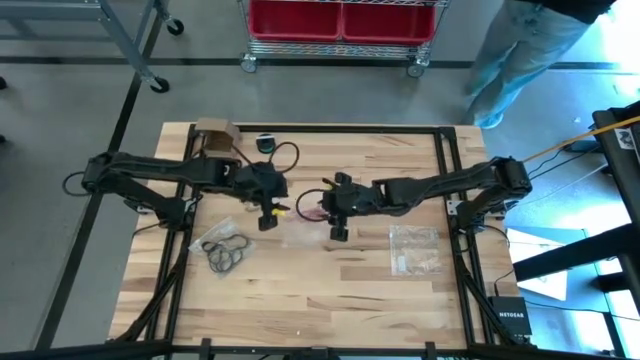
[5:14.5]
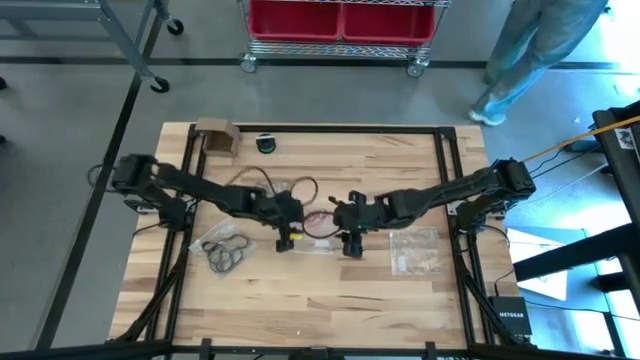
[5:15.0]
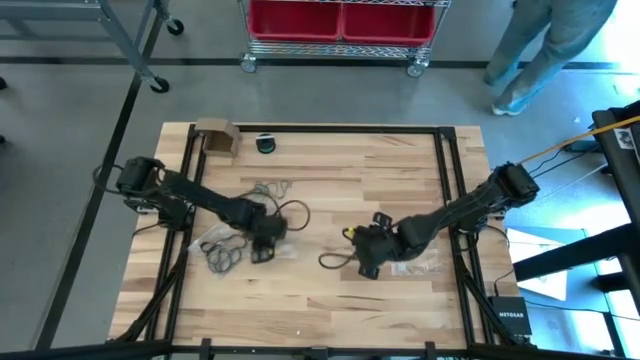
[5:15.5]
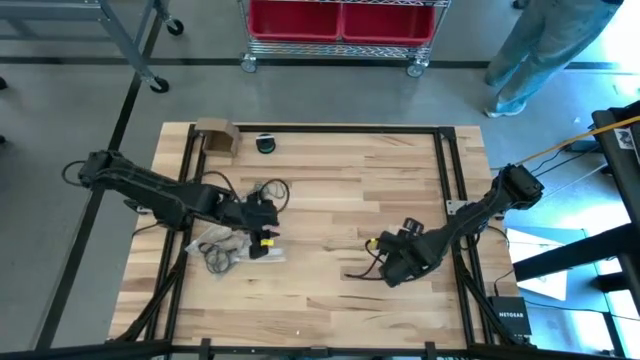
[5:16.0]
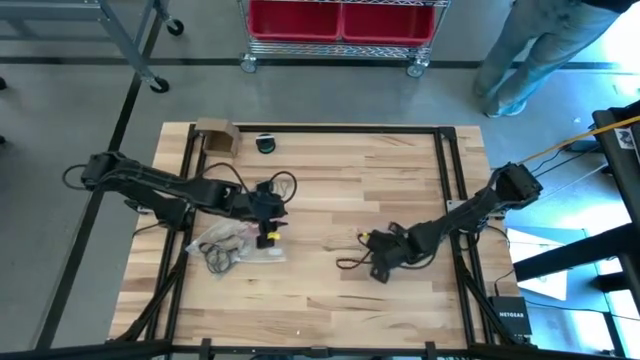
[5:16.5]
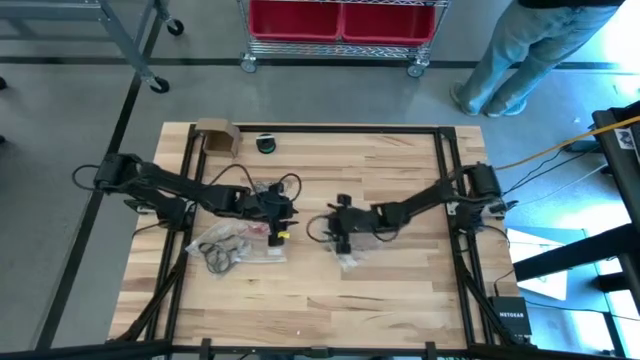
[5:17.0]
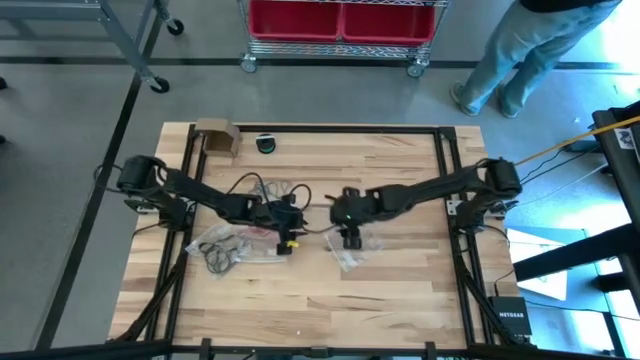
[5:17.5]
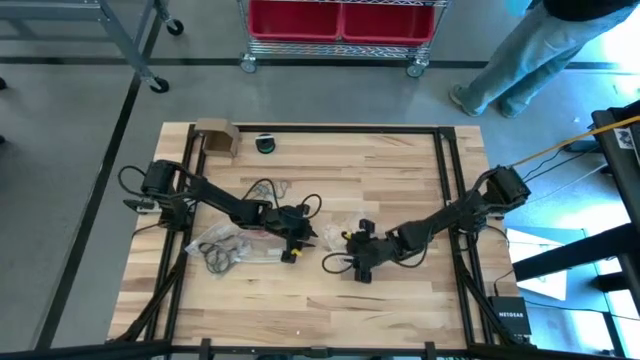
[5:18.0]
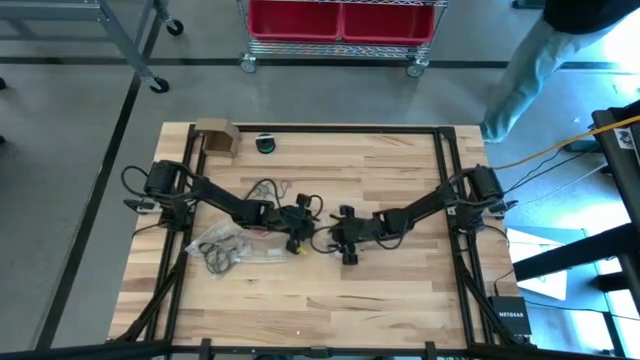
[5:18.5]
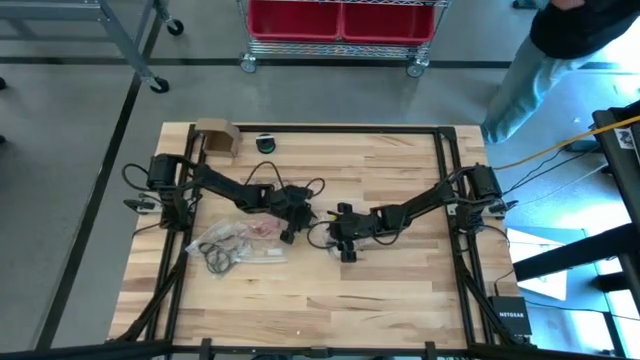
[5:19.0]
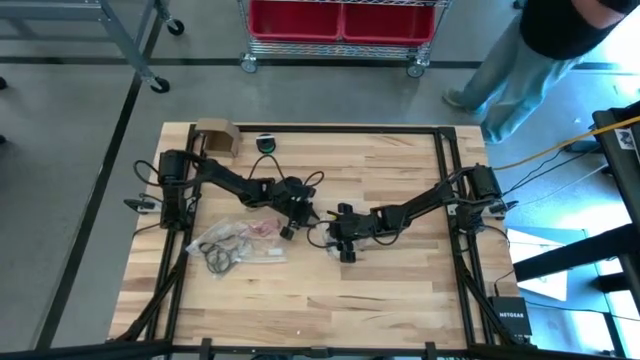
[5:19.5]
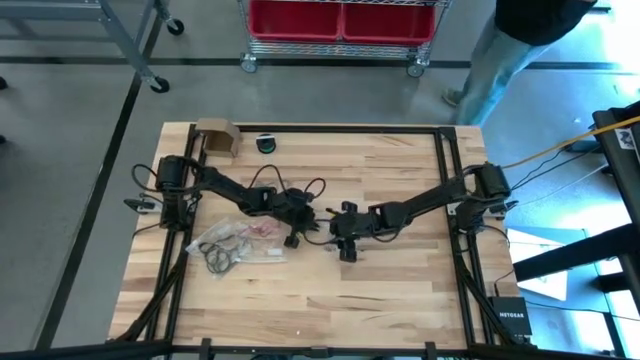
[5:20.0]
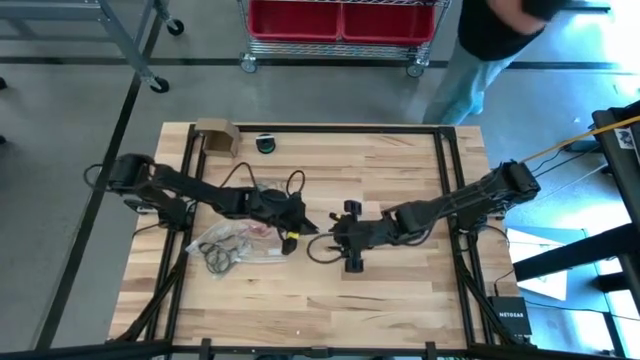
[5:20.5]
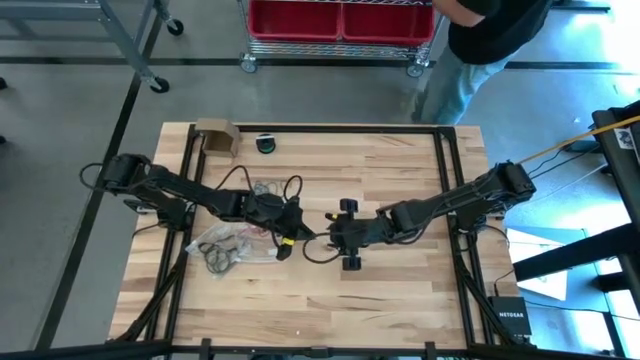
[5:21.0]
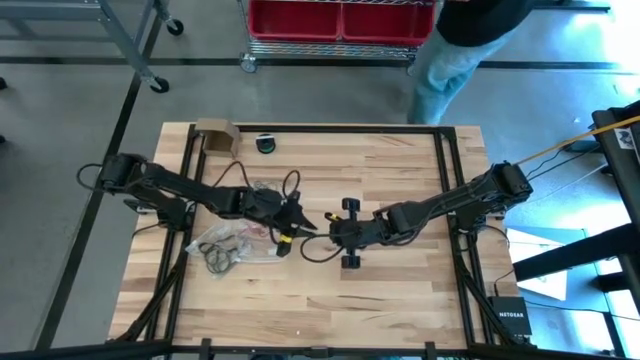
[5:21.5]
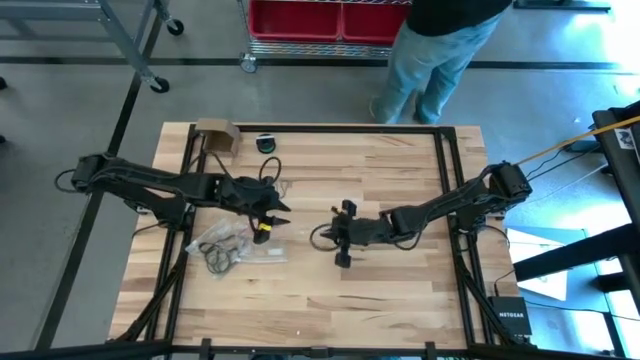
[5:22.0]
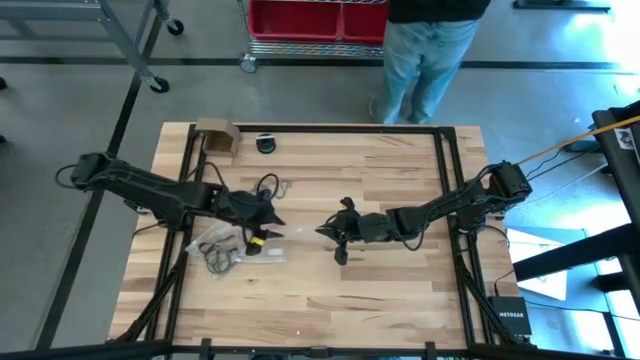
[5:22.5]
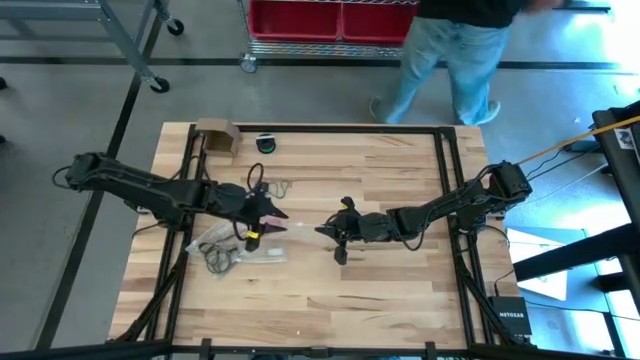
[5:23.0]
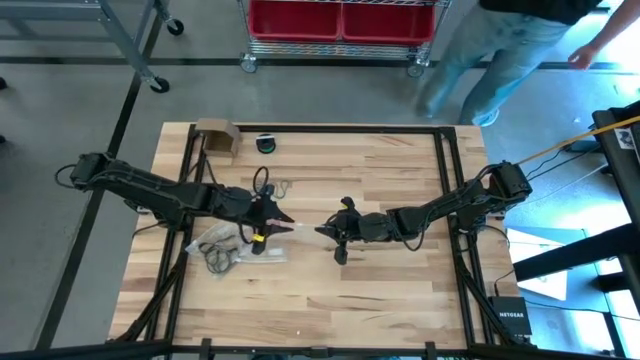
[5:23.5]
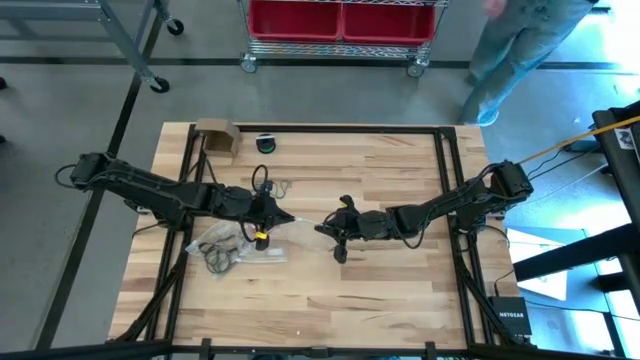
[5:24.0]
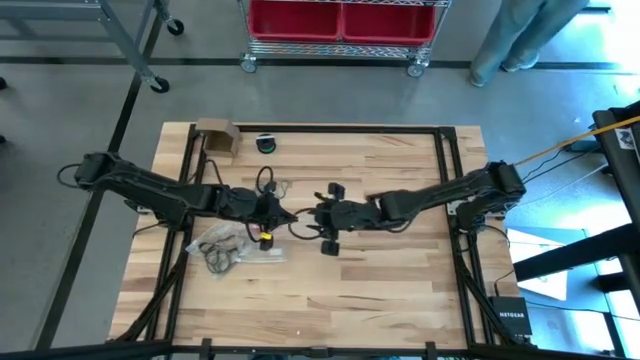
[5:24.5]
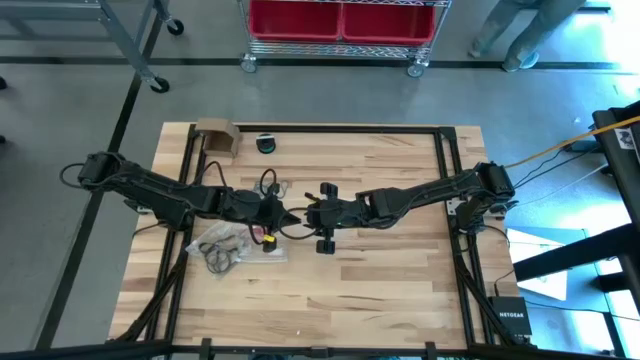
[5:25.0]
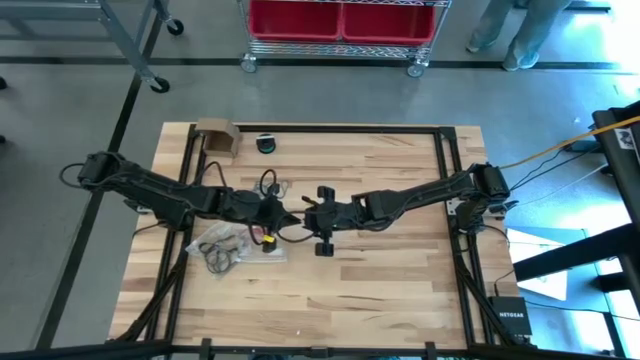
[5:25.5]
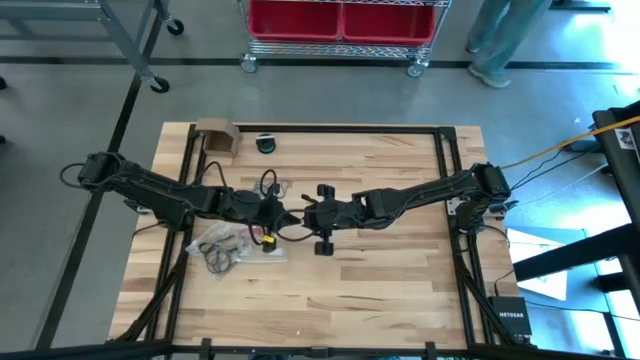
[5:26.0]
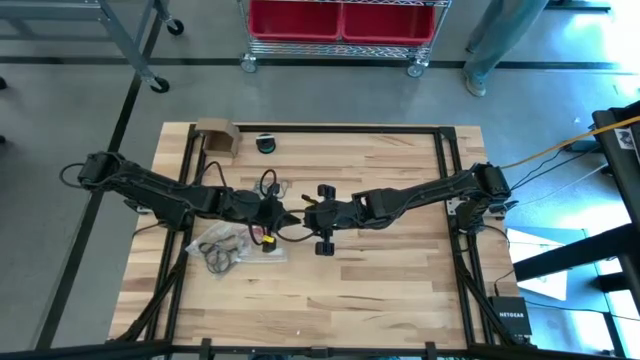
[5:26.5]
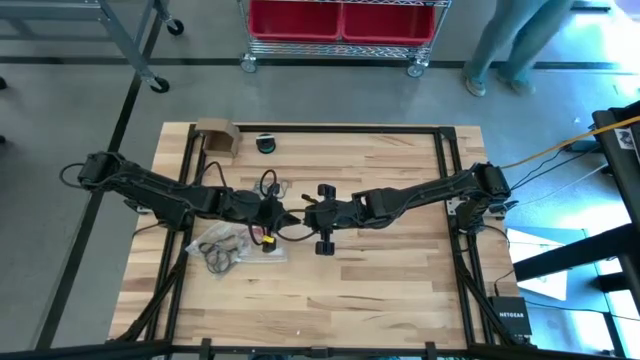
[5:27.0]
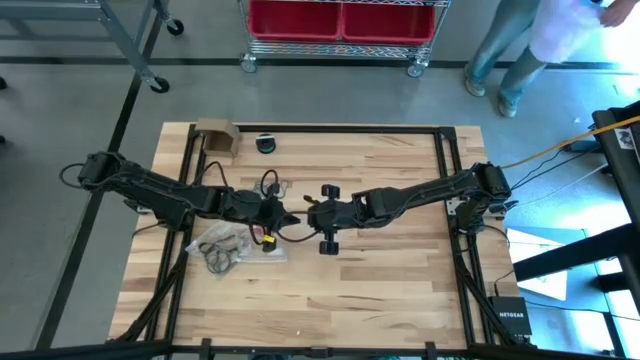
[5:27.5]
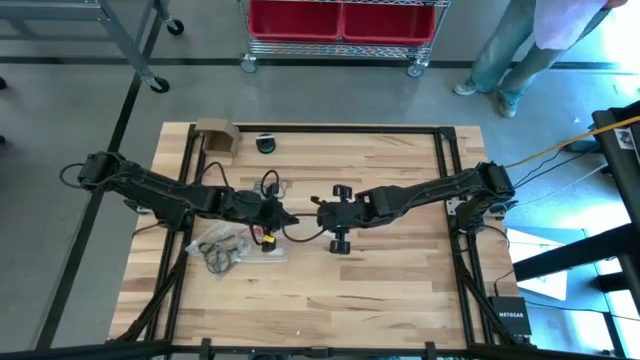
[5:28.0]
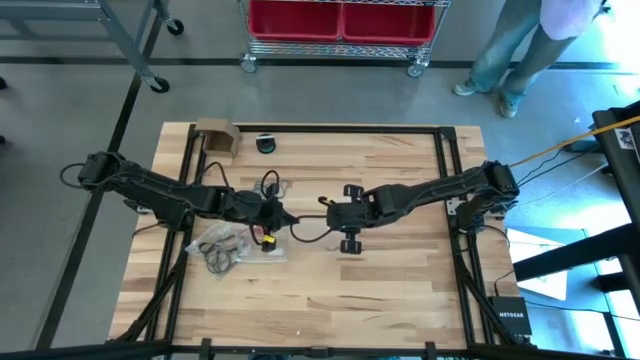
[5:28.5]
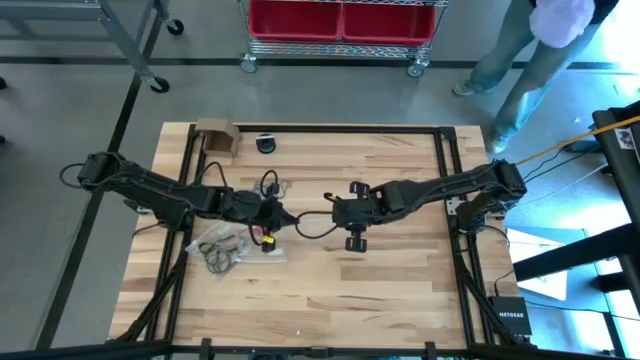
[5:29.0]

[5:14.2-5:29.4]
Task: Sort rubber bands
Open the transparent zip bag

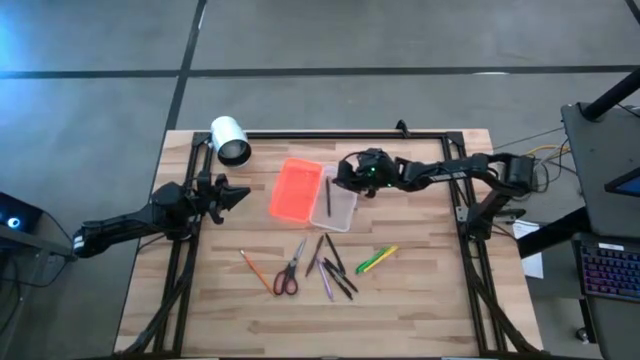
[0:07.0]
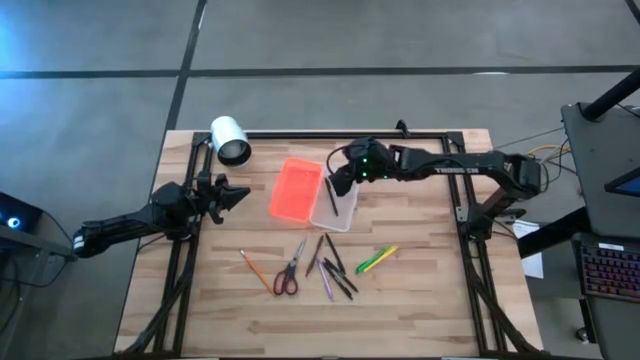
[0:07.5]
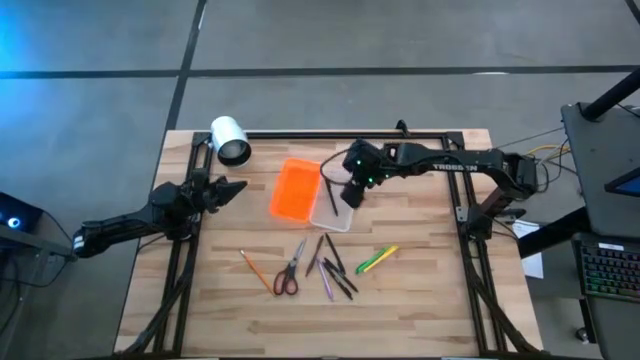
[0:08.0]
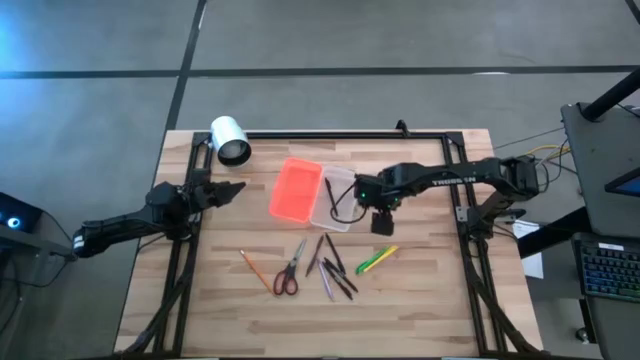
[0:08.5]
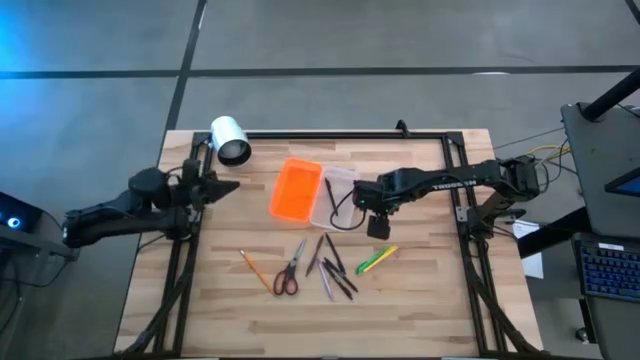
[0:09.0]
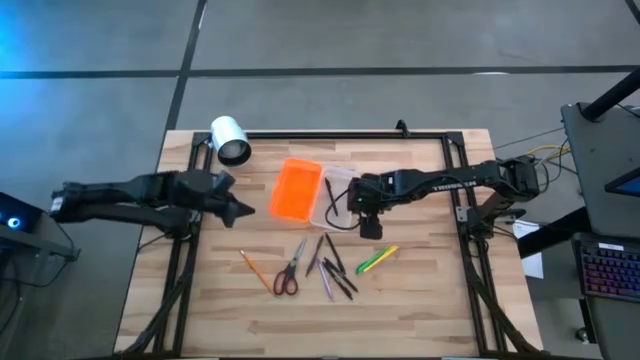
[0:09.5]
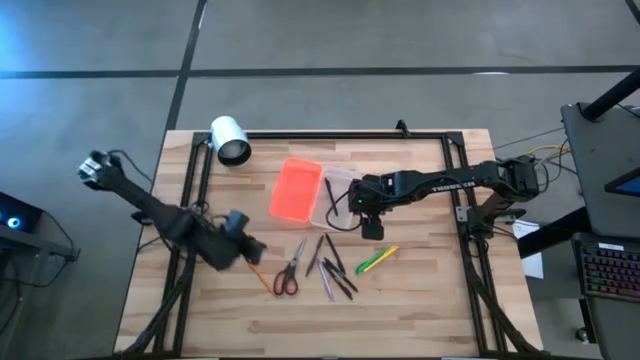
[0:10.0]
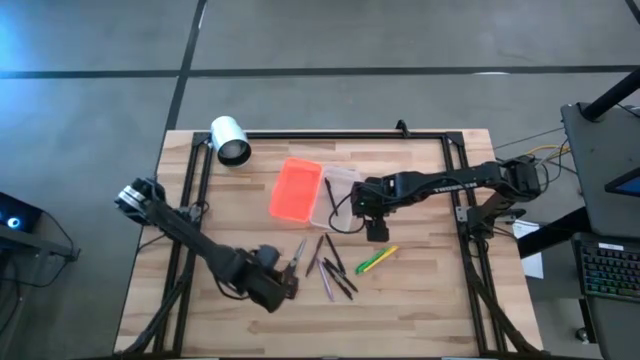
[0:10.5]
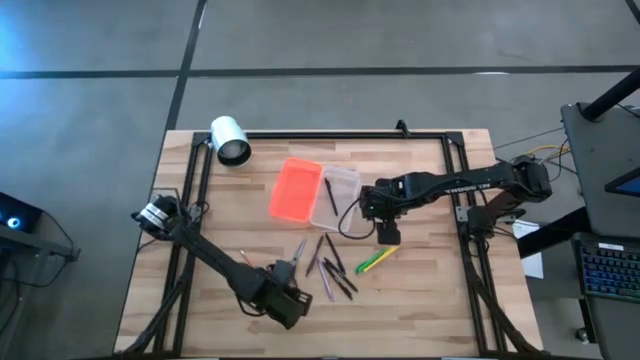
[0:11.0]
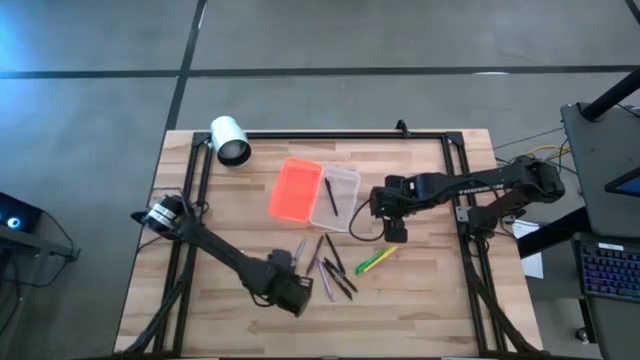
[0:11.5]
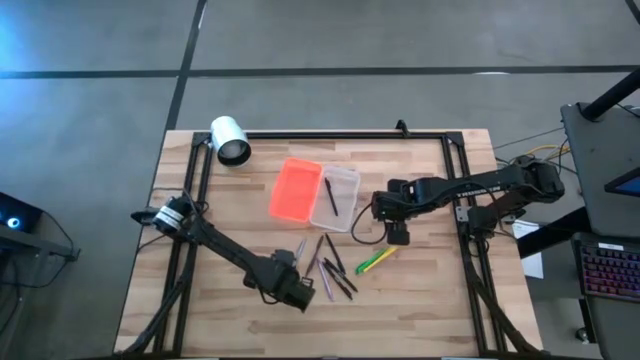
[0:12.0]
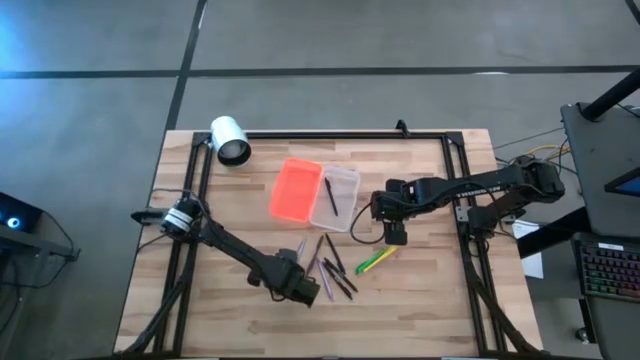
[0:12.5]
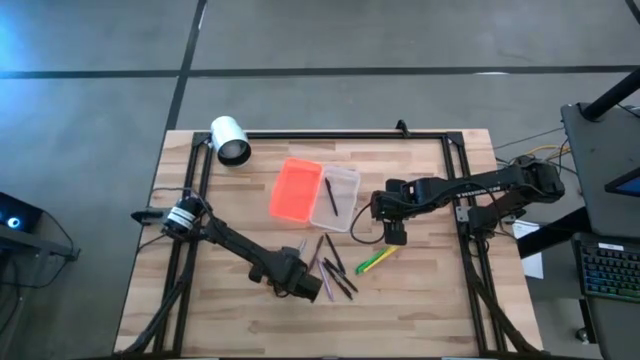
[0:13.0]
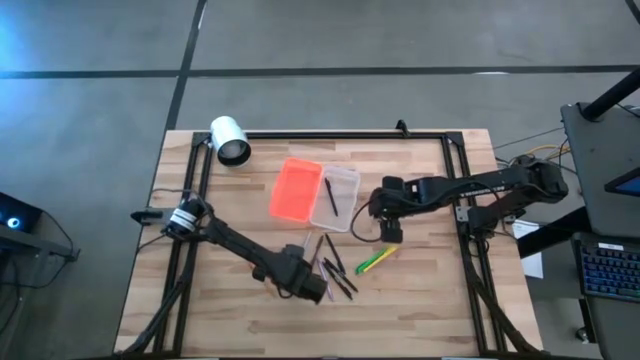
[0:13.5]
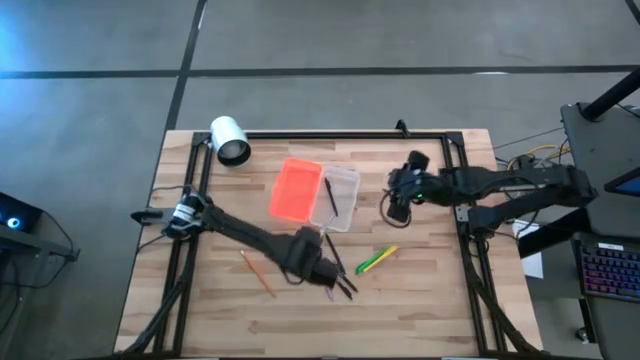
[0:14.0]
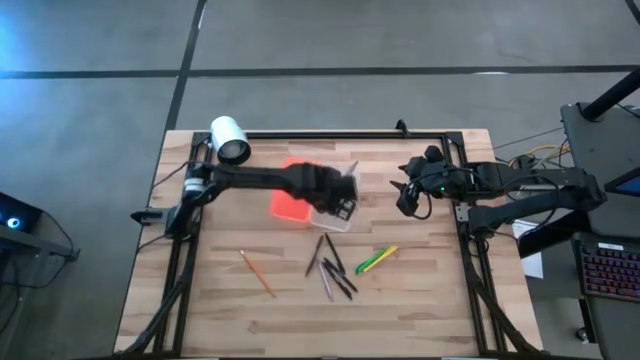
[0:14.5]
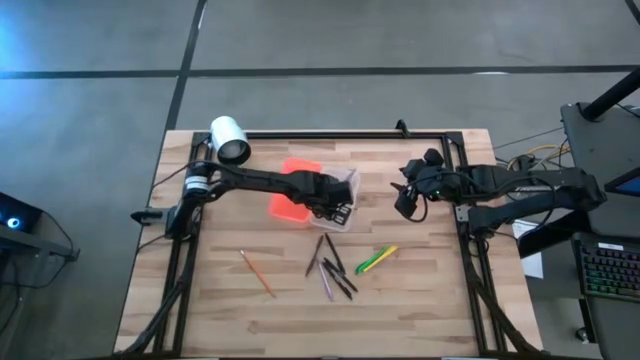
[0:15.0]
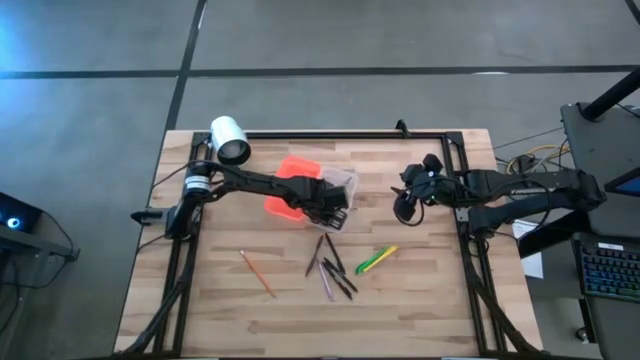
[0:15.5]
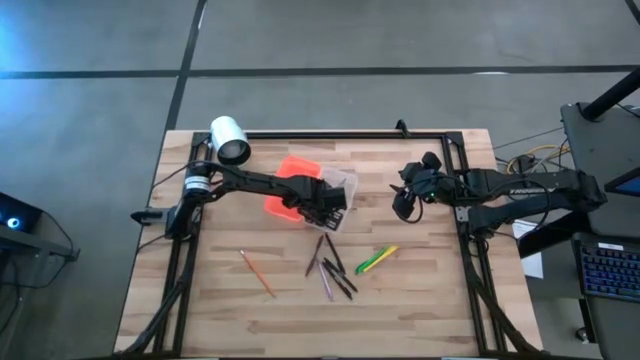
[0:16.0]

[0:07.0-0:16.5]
Task: Pick & place school supplies into a supply box
Put the black scissors into the orange supply box
